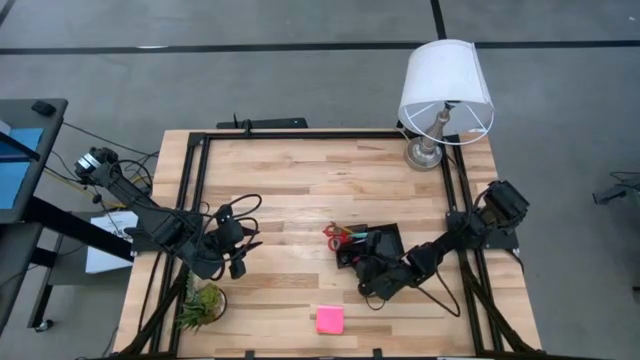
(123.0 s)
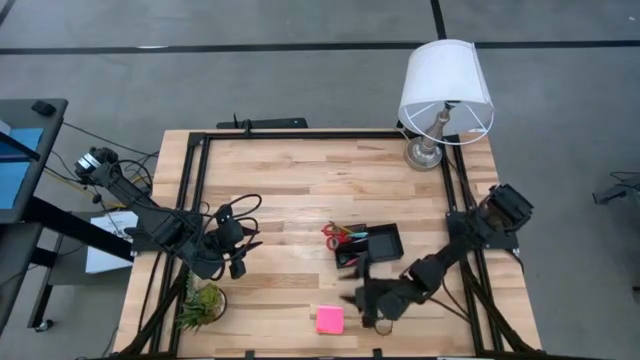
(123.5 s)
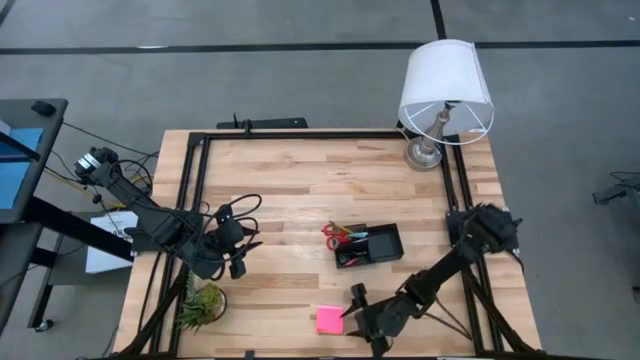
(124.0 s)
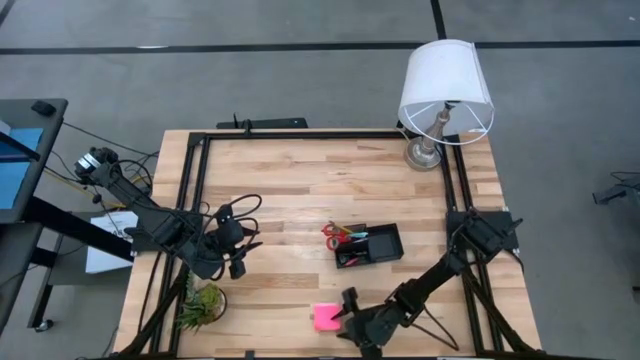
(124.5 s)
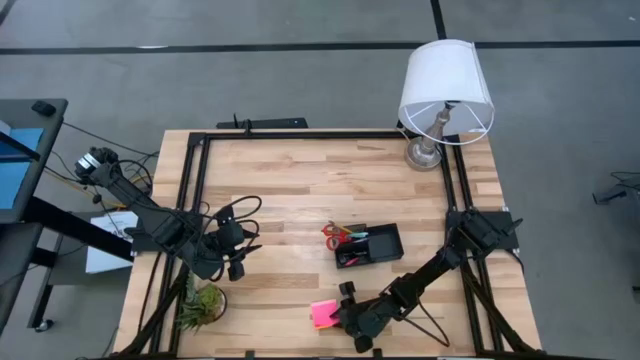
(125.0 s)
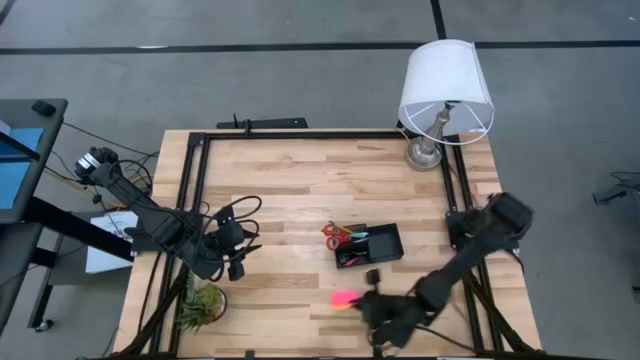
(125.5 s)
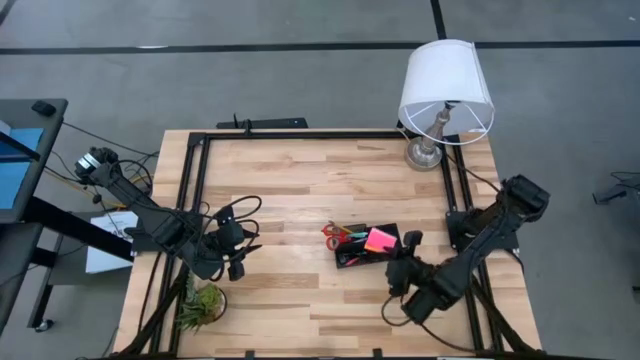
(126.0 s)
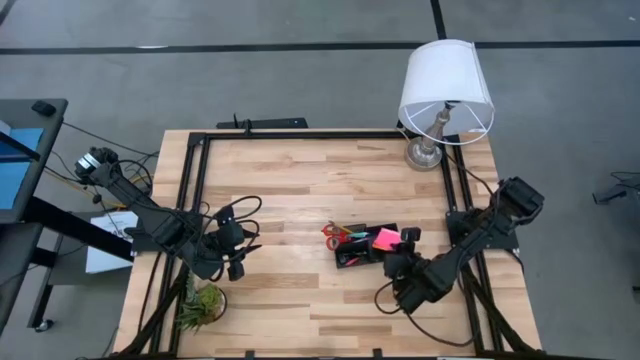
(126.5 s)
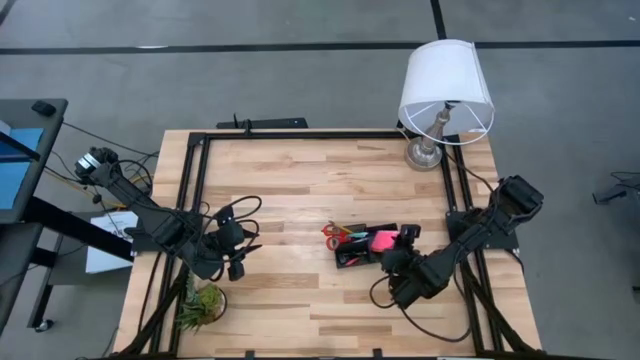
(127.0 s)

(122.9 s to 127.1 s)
Task: Pick and place office supplies into organizer
Put the sticky notes into the desk organizer

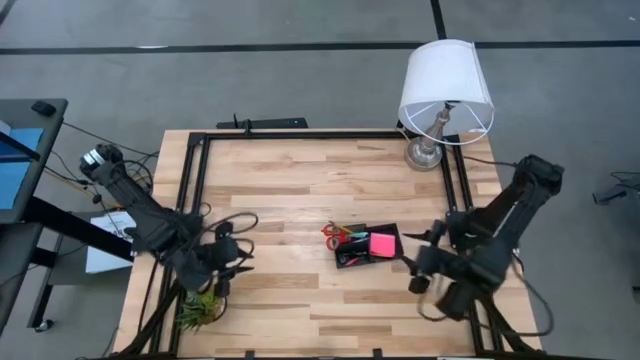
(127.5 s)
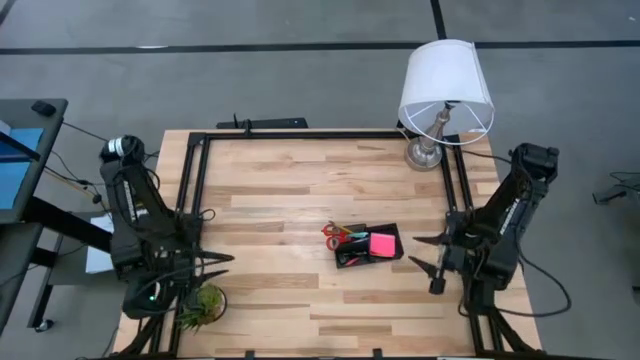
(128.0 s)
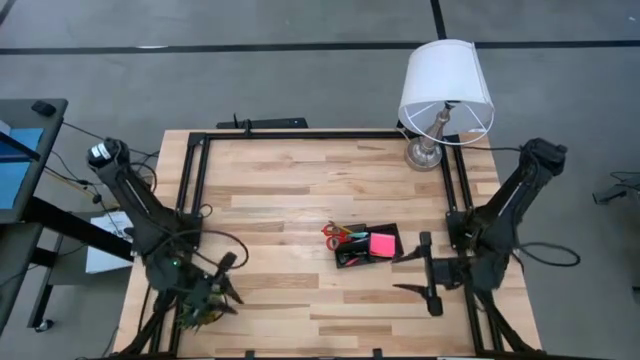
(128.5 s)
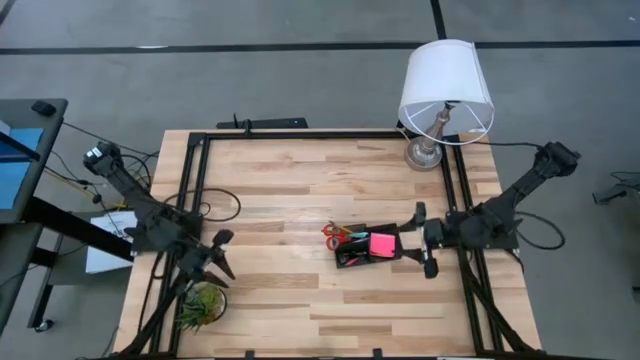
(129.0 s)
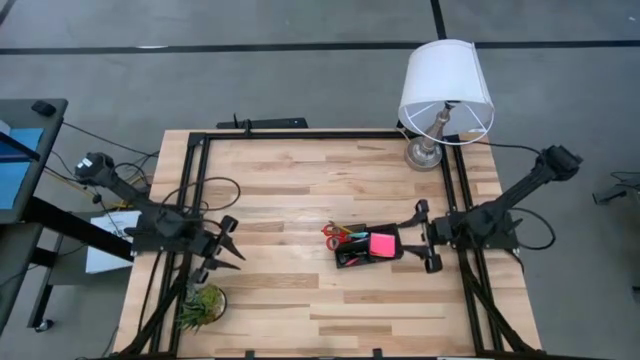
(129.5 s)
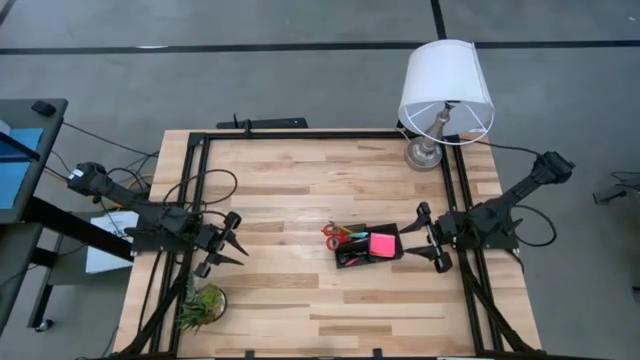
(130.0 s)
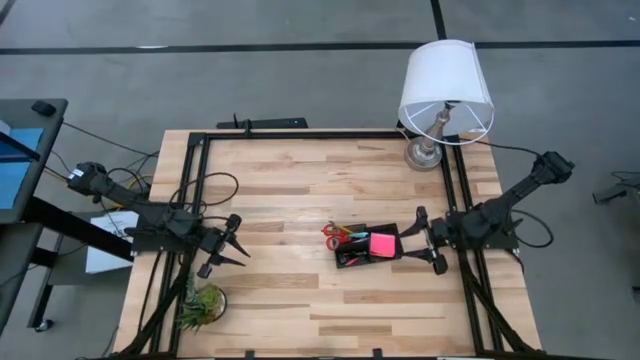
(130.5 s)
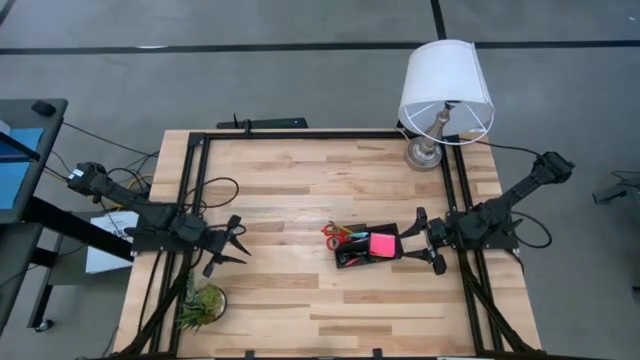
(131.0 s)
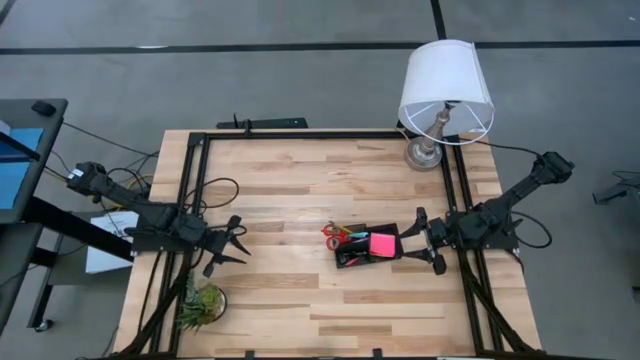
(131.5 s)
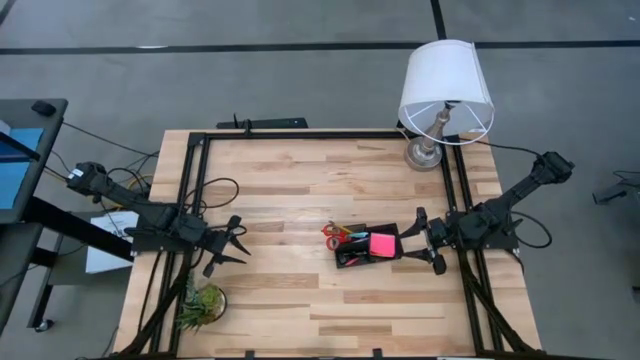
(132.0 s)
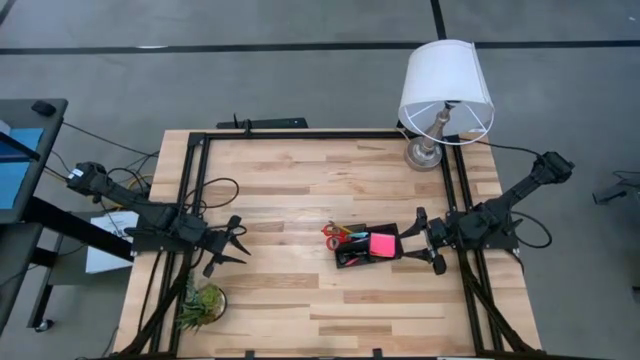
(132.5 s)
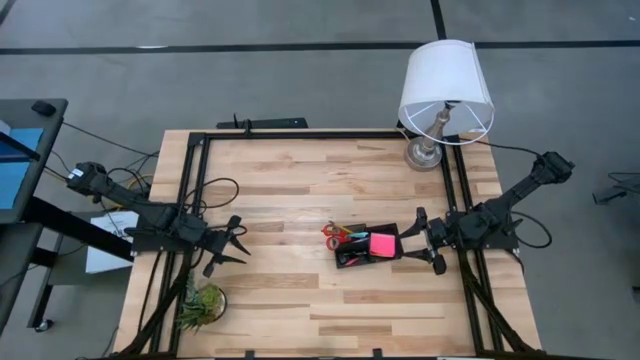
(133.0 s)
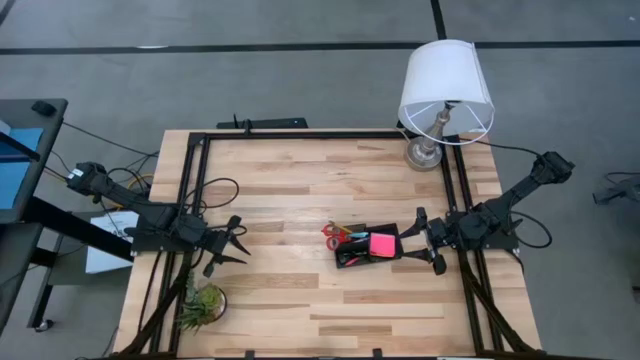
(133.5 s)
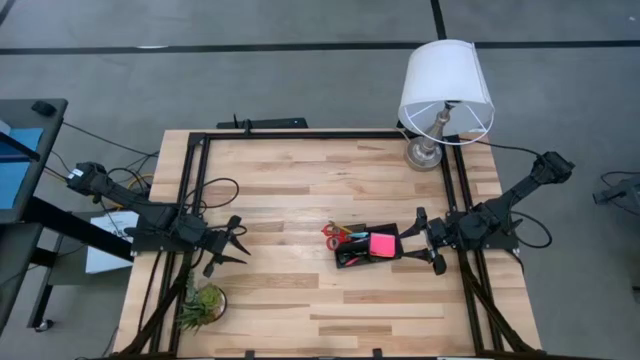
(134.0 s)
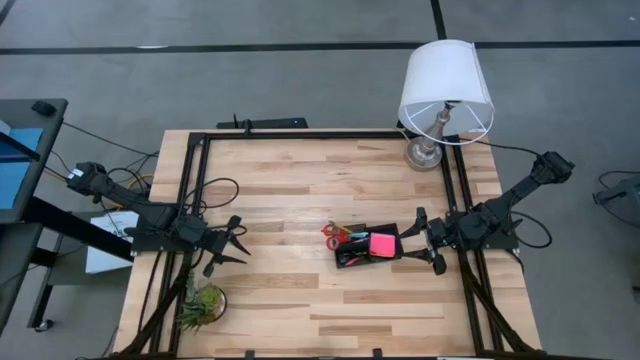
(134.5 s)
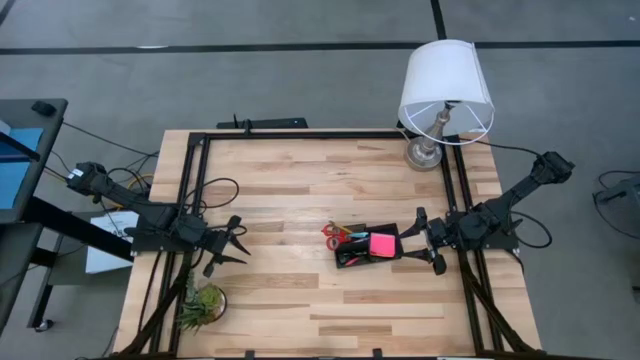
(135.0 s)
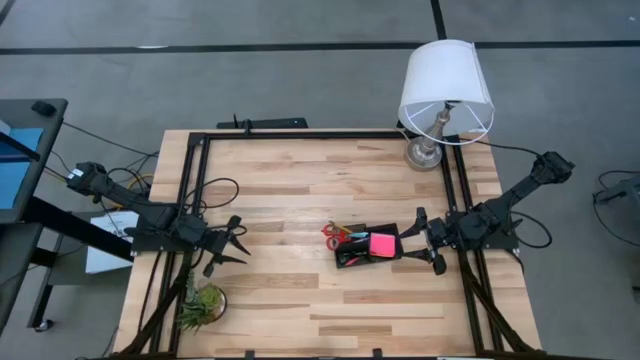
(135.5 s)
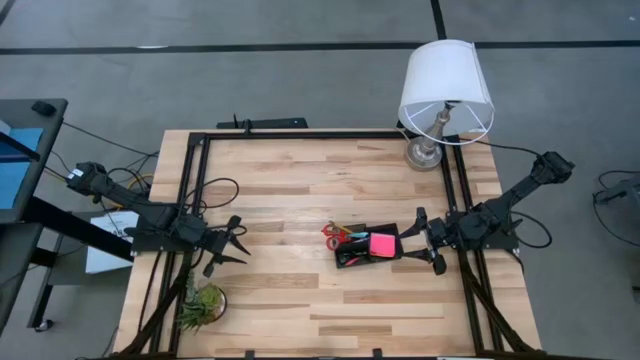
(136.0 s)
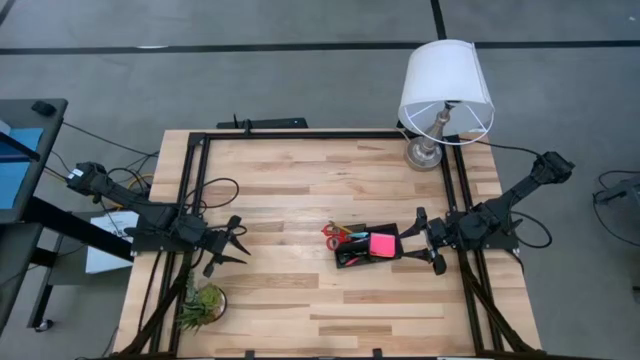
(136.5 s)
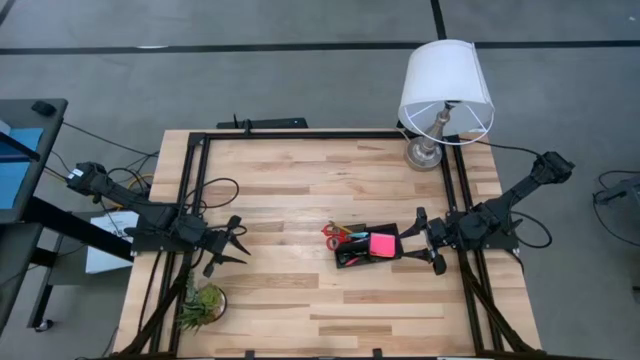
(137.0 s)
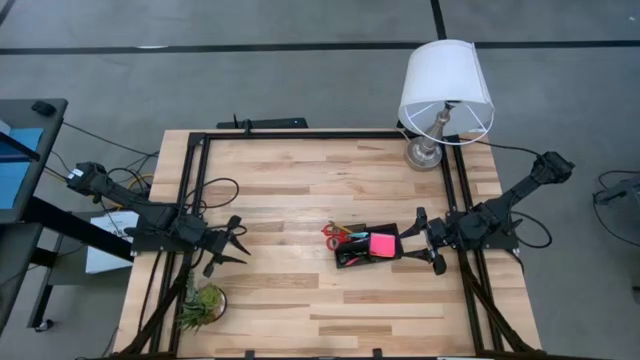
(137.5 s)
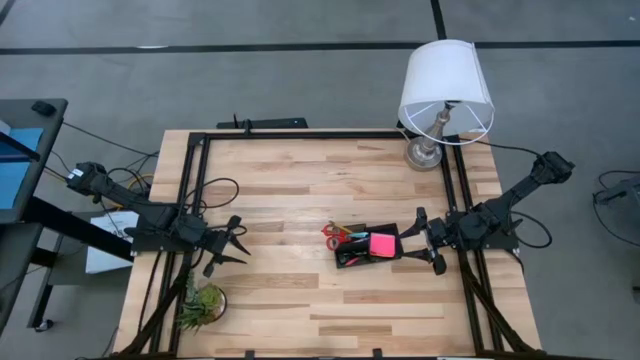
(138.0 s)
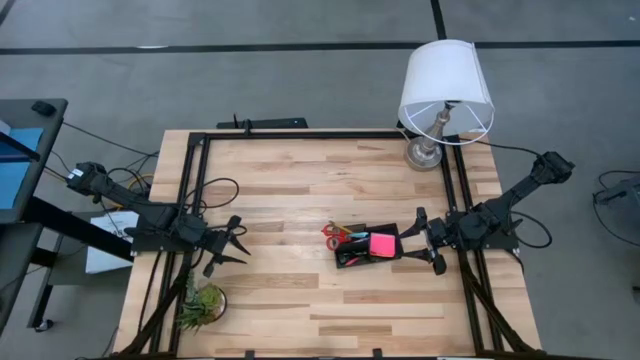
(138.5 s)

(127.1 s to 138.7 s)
Return to Home Position

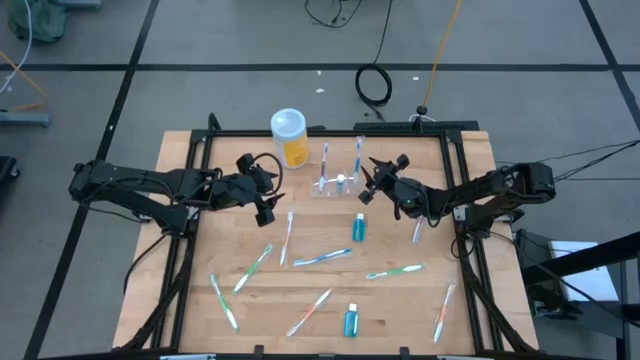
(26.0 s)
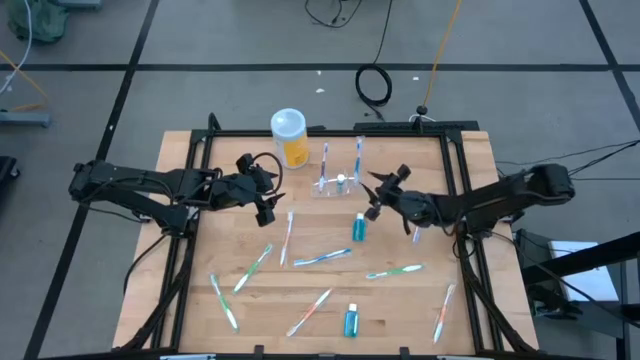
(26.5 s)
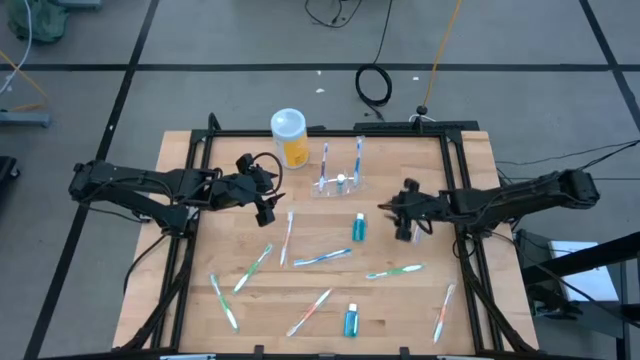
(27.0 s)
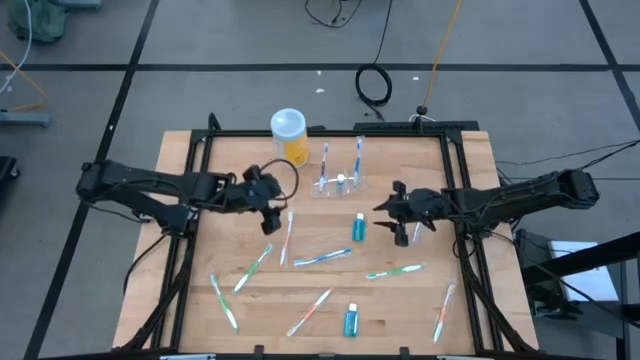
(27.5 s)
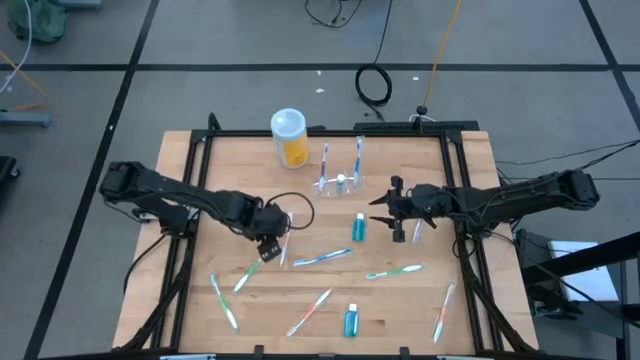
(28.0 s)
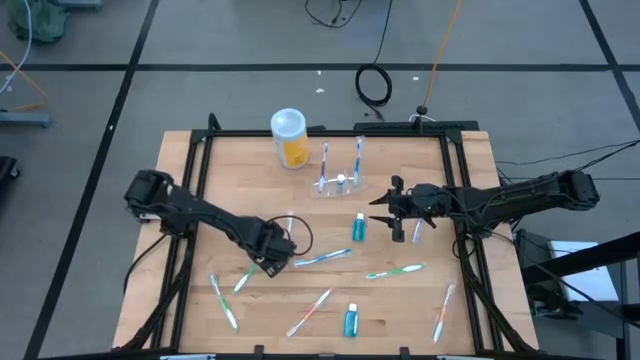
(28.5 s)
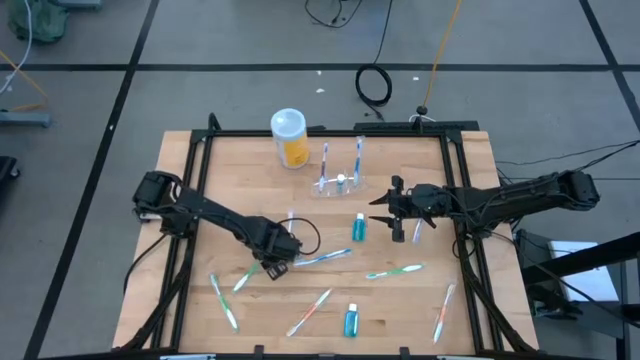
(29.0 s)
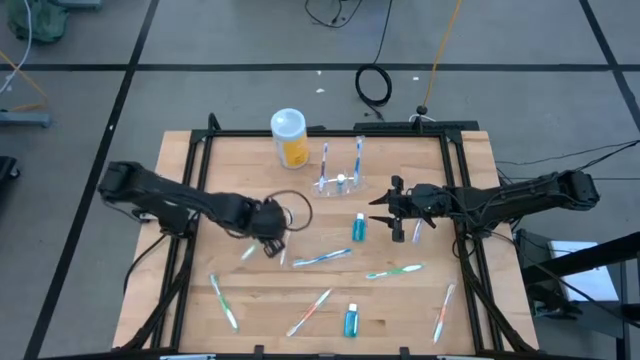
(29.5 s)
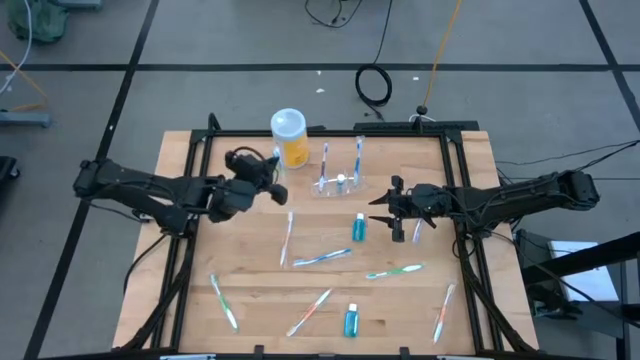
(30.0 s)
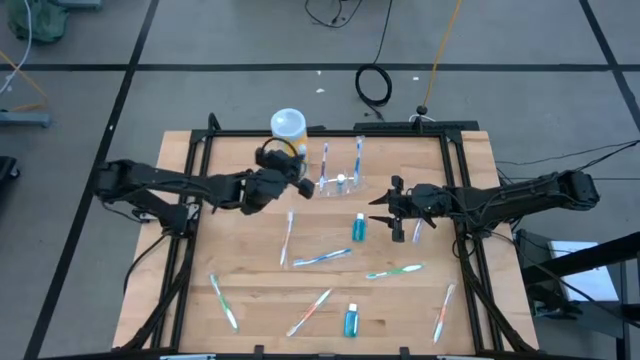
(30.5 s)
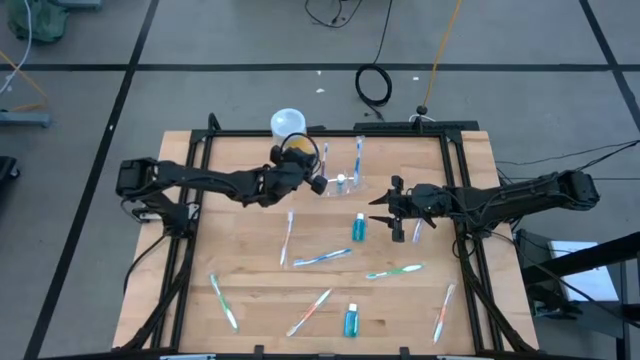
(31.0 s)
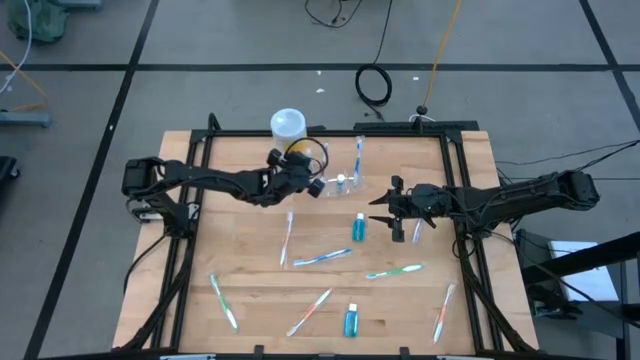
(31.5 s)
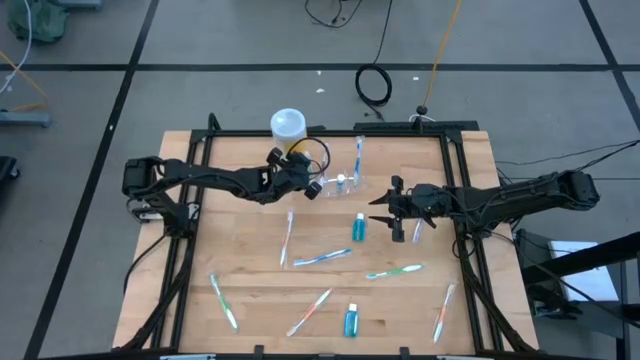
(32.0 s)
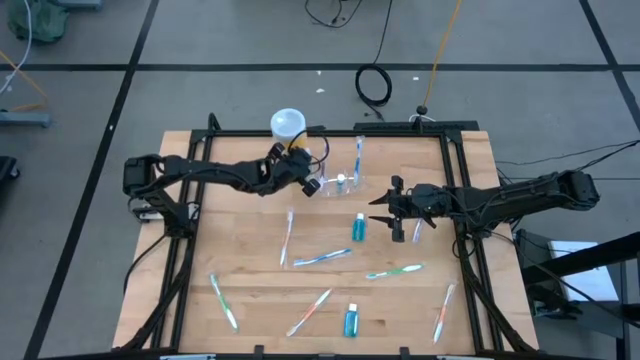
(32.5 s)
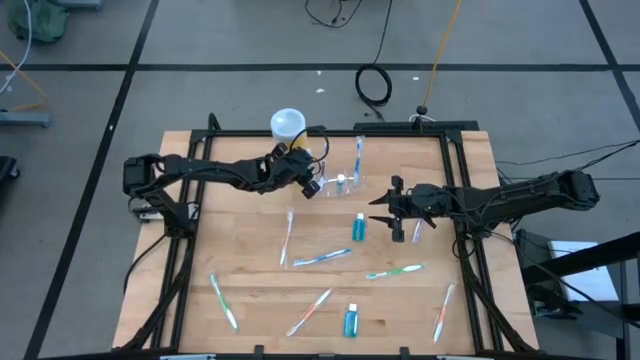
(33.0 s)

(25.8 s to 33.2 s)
Task: Pick & Place toothbrushing station
Put the top left green toothbrush into the transparent organizer
